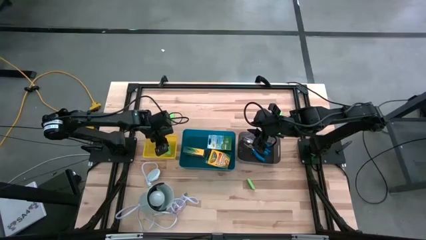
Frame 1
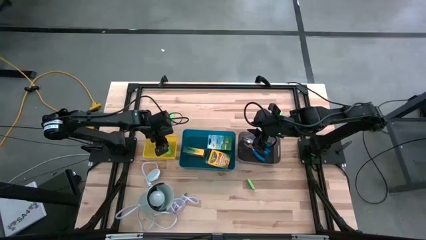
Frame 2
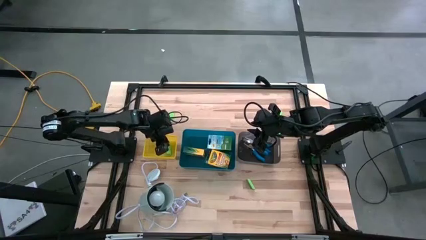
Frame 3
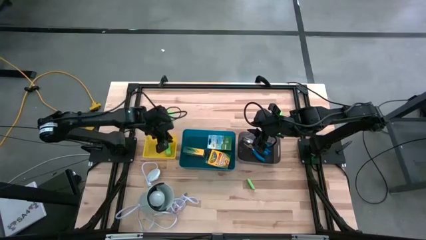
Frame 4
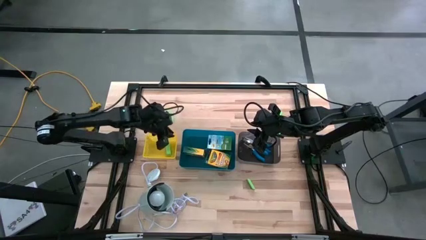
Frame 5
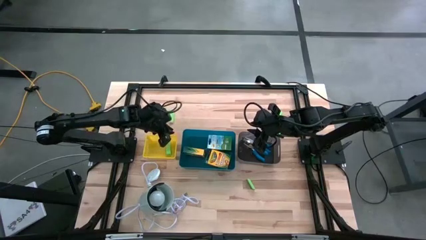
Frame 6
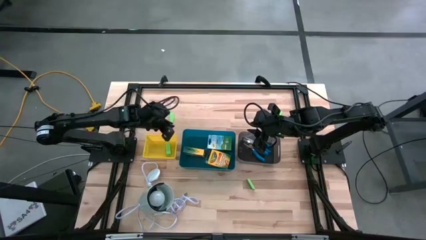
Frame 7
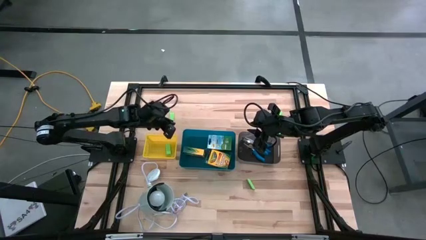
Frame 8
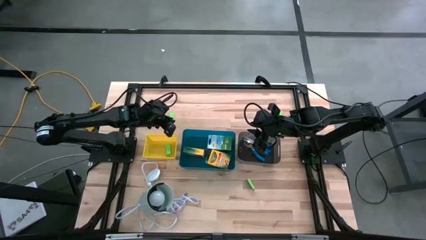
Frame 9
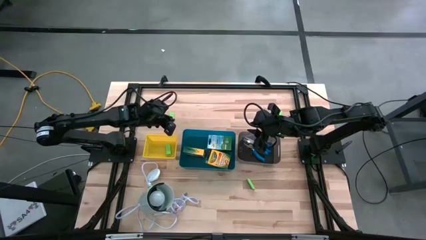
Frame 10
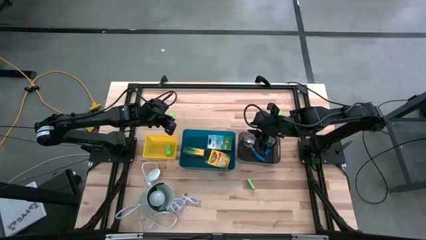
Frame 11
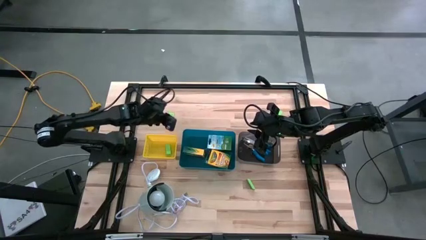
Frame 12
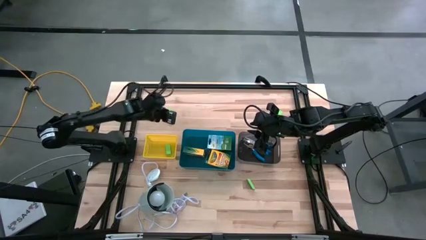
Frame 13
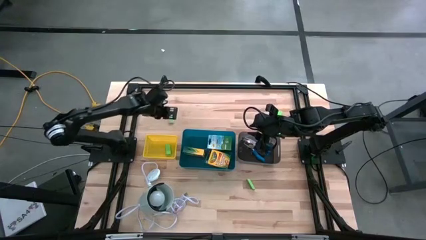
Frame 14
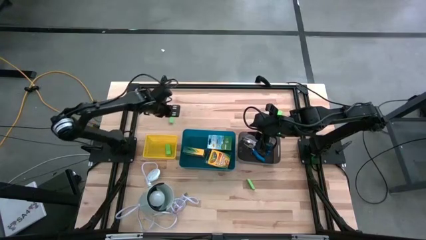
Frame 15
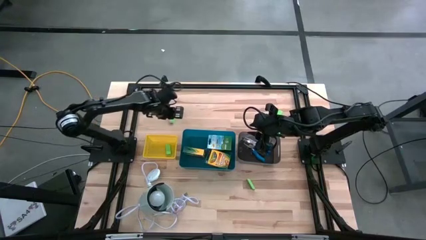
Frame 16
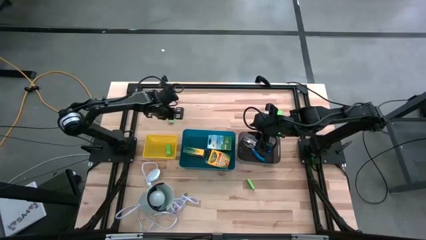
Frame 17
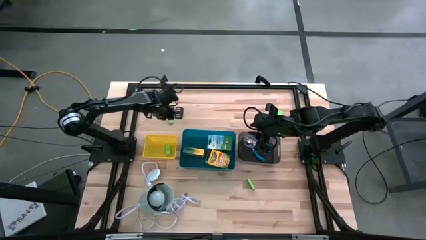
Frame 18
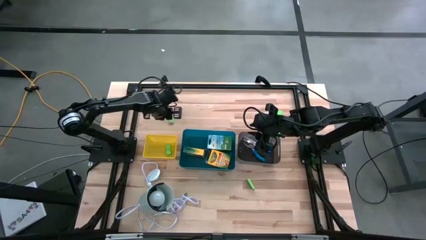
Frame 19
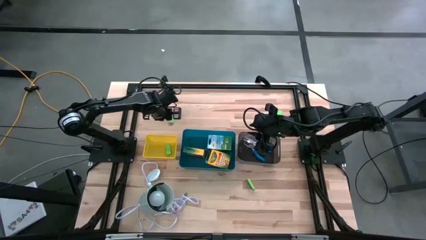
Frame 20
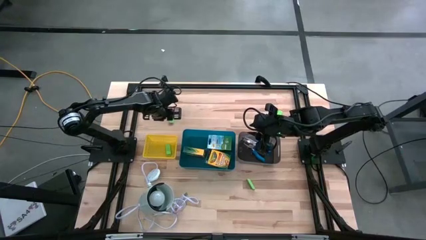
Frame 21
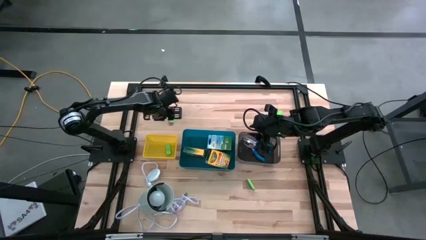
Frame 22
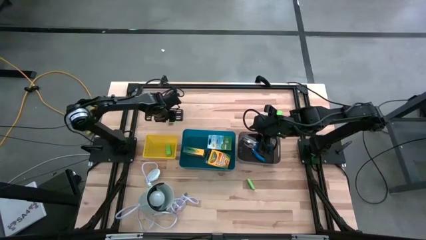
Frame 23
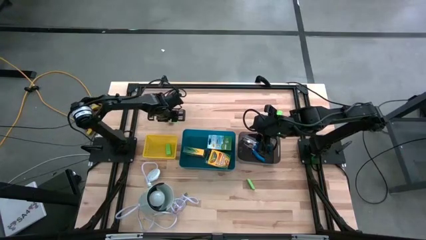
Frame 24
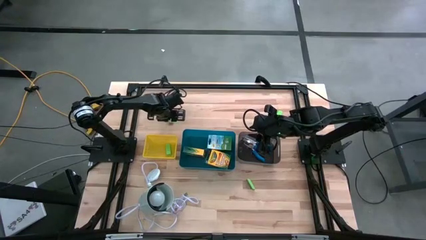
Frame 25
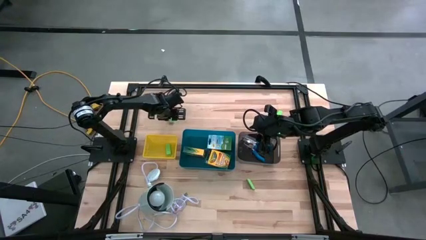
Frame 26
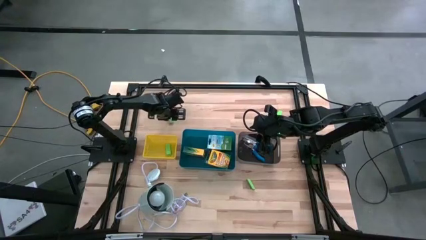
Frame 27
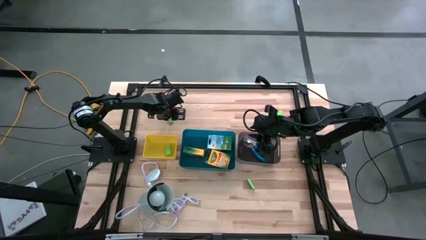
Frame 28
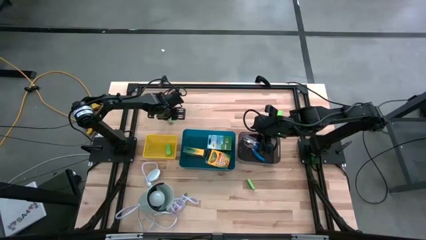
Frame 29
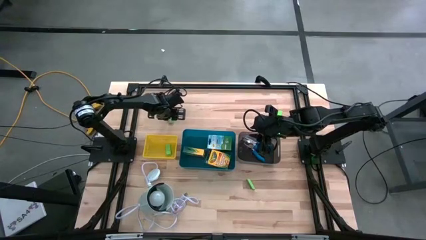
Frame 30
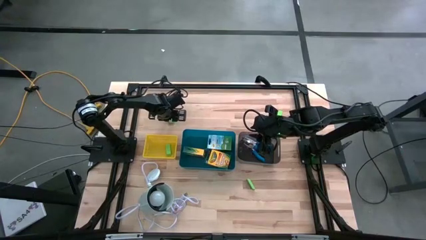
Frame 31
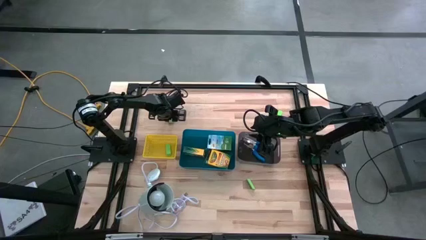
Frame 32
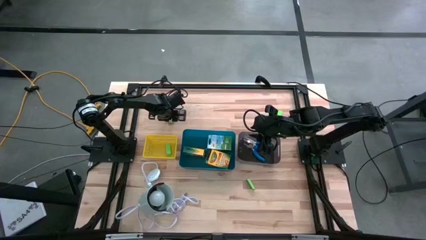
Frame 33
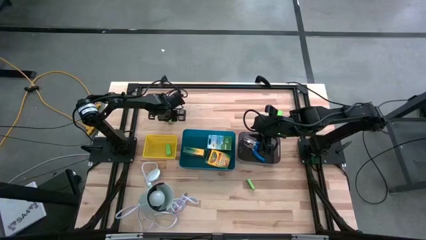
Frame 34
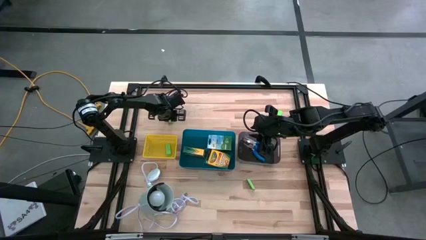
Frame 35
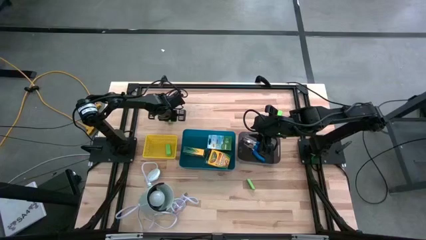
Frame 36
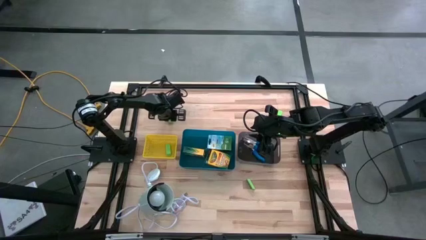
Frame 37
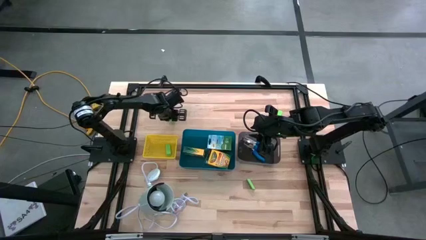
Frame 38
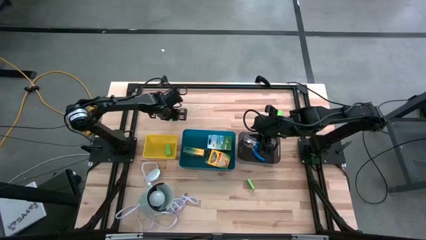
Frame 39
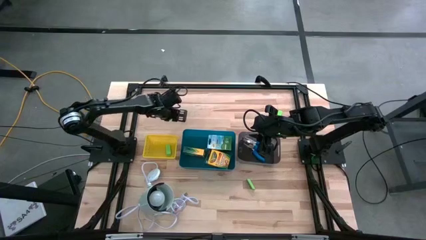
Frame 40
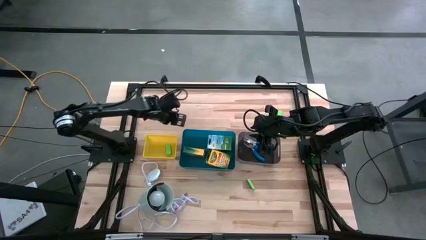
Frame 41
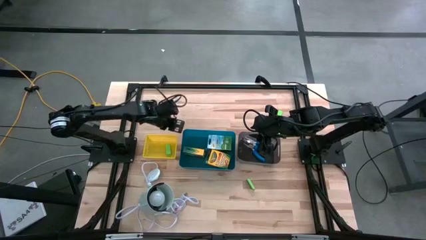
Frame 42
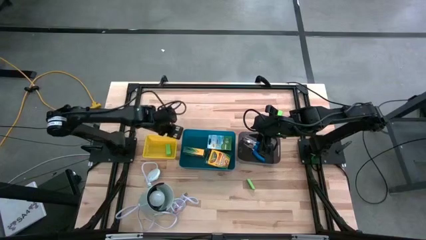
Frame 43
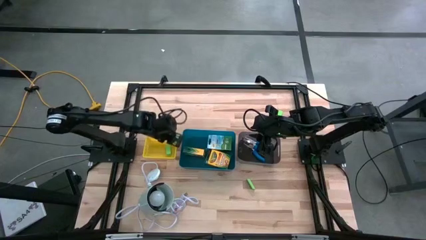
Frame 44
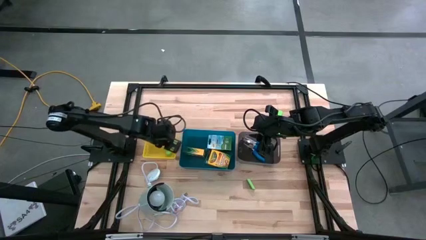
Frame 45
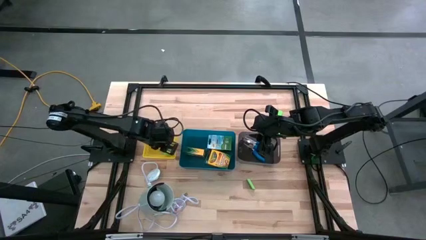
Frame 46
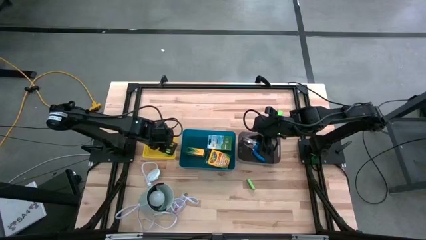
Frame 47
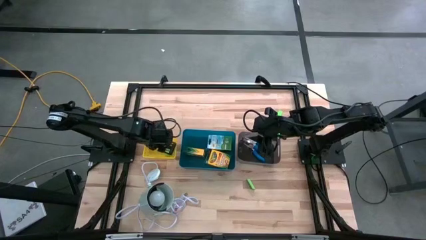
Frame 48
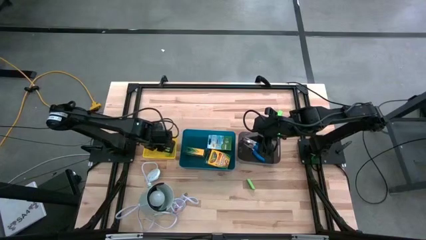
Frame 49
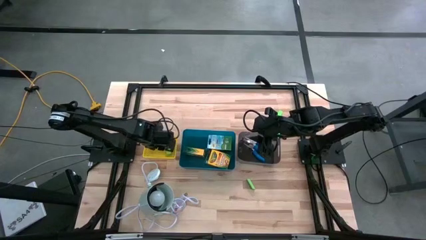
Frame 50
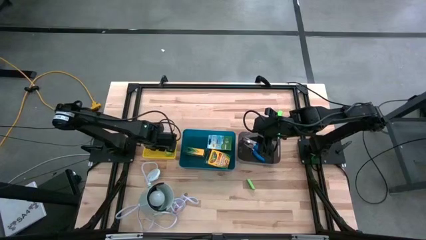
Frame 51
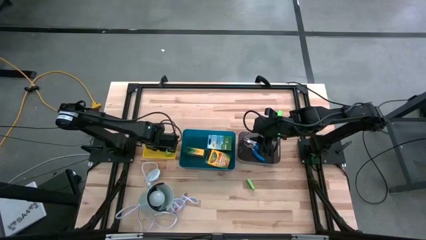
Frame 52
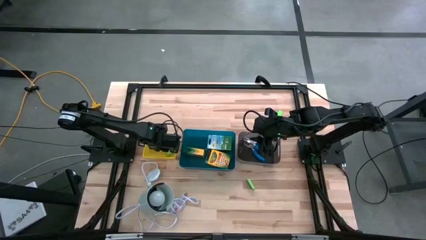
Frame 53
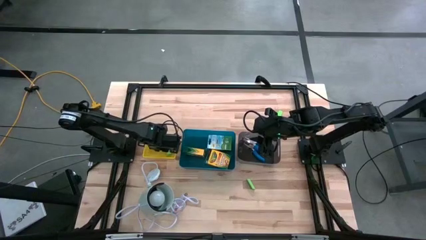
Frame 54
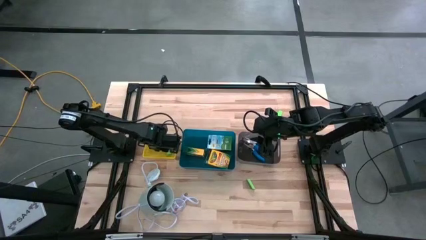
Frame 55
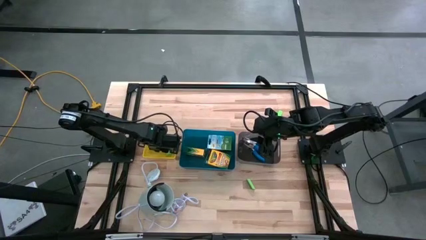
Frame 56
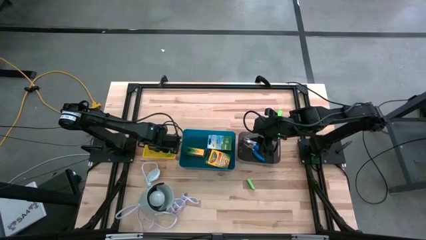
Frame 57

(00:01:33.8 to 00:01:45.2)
Task: Pick & Place School Supplies
Put the green eraser into the yellow bin

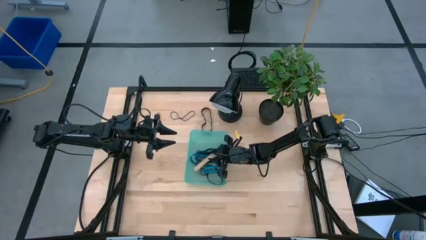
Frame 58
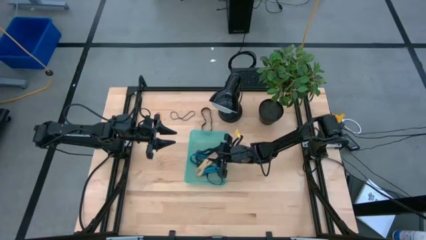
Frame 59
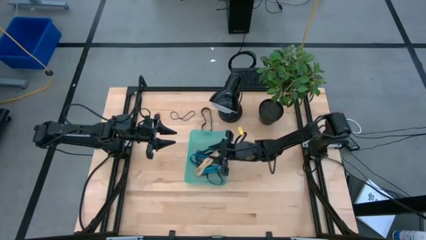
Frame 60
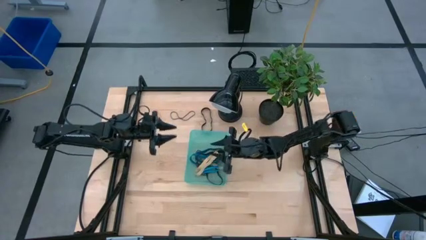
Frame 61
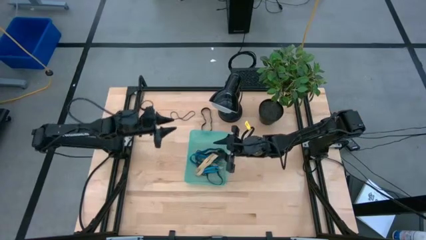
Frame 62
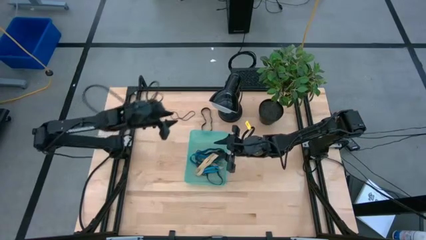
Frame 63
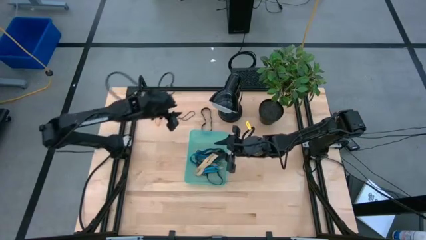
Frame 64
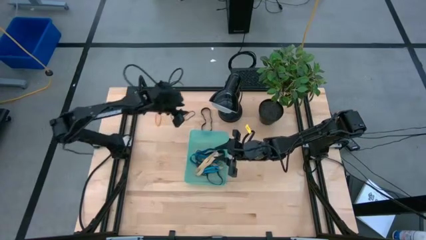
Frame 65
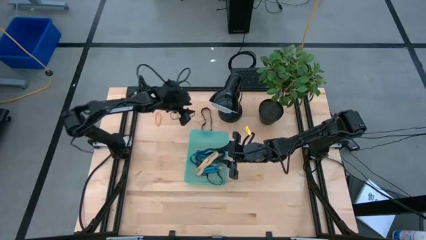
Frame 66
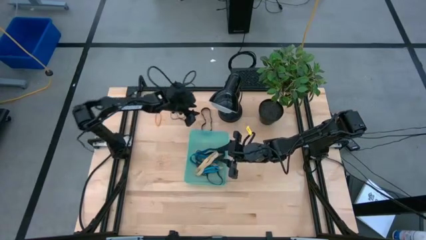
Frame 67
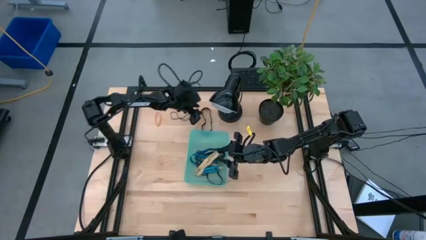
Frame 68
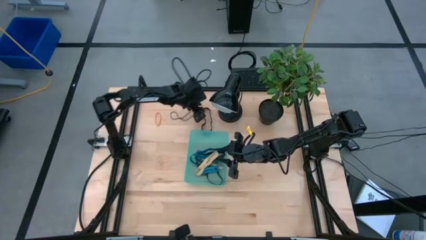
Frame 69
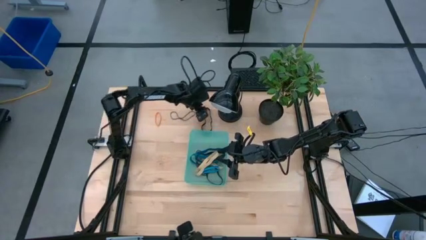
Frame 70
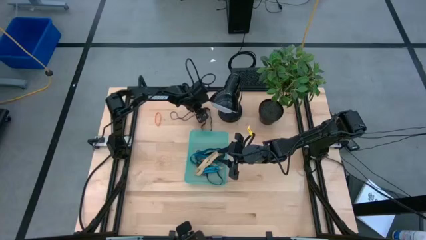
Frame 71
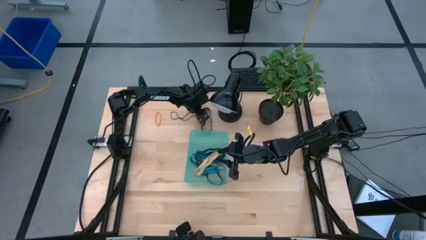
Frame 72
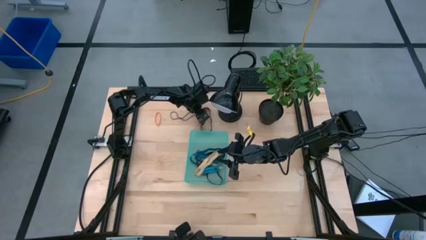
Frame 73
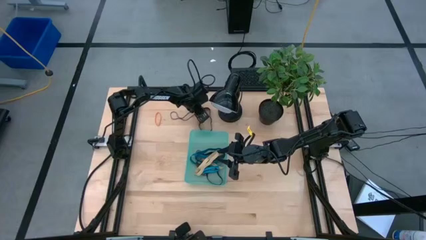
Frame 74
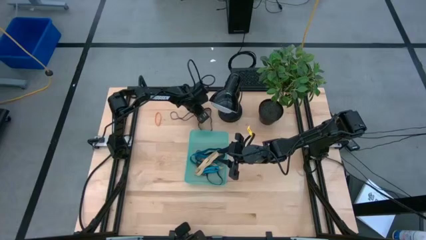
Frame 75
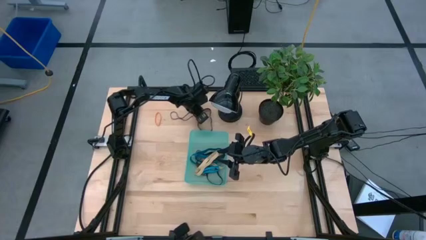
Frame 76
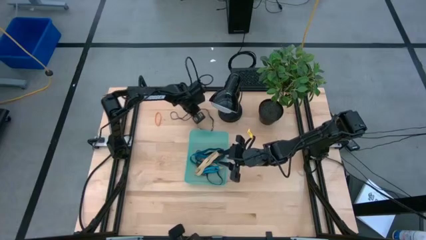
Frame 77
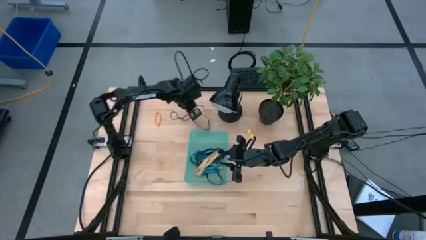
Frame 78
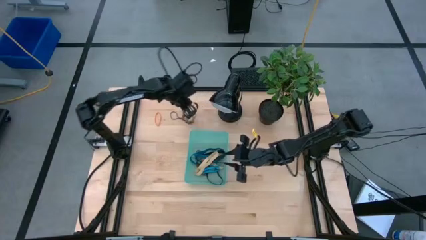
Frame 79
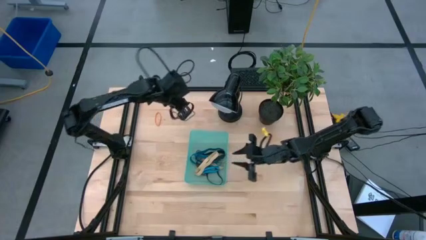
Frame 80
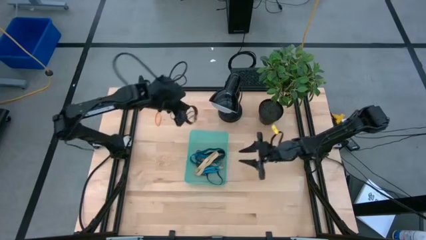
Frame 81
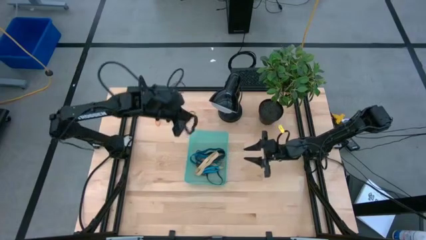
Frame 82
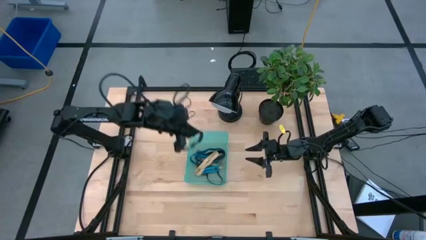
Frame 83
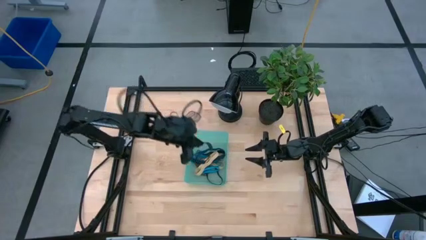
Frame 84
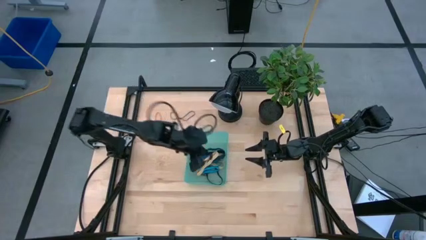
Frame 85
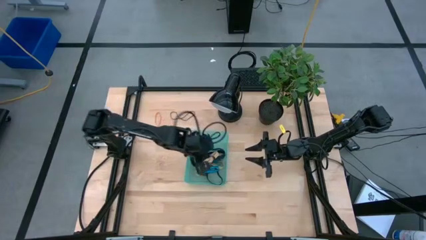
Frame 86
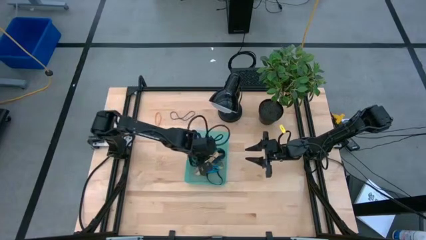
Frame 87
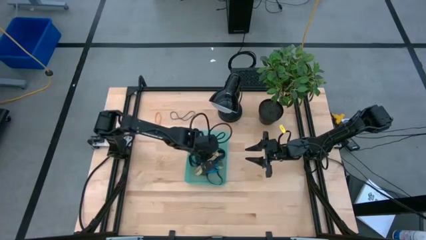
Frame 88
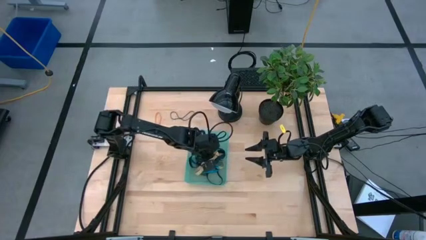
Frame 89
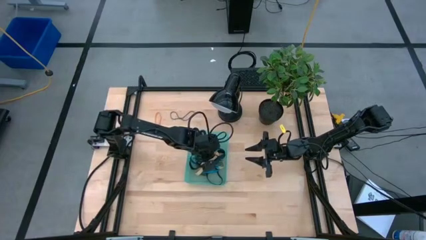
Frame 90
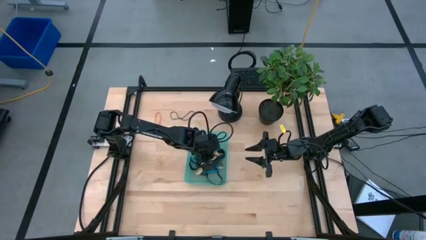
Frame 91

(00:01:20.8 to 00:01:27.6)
Task: Pick and place rubber bands into bin
Put the black rubber band into the basket
